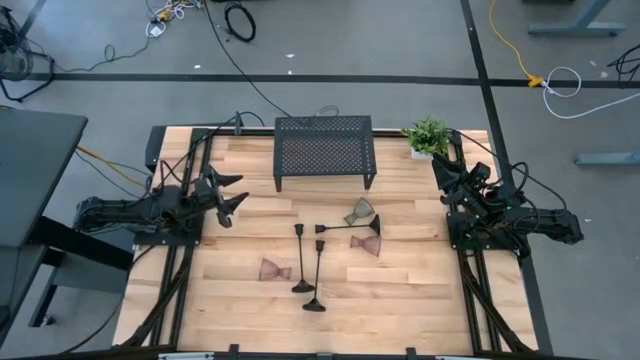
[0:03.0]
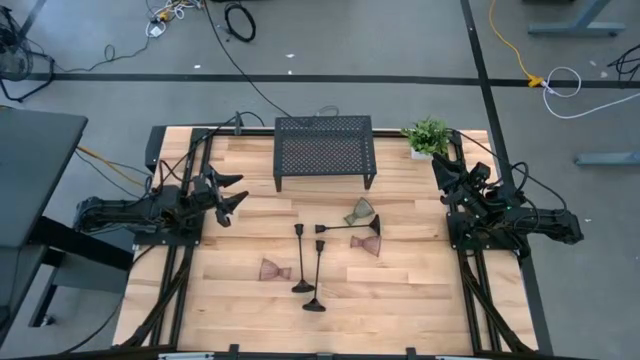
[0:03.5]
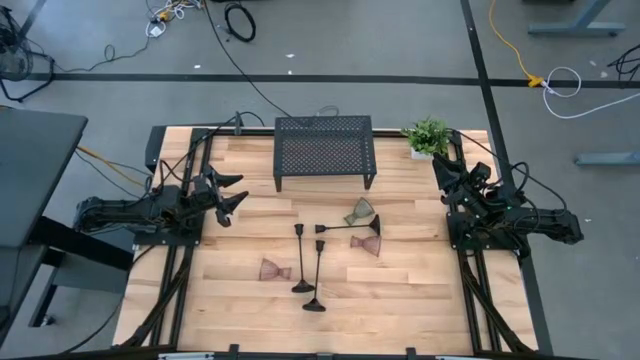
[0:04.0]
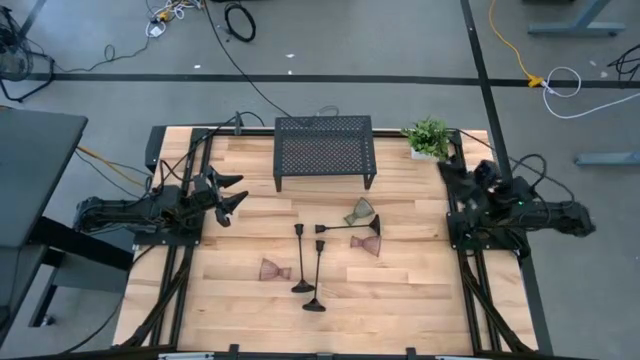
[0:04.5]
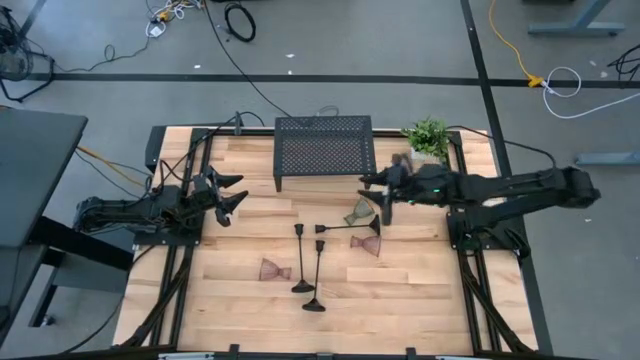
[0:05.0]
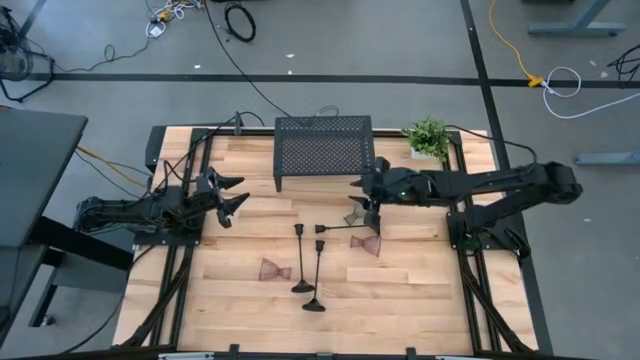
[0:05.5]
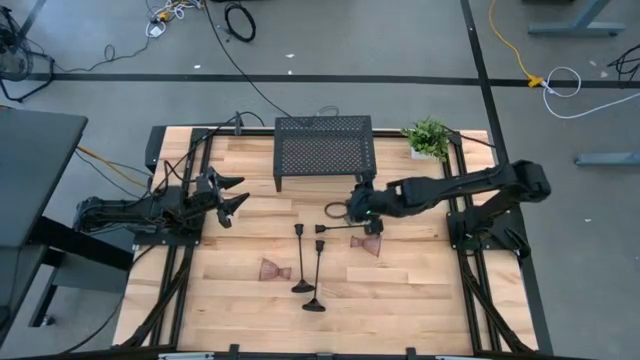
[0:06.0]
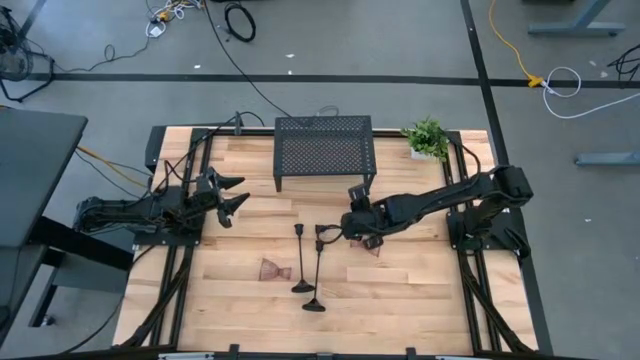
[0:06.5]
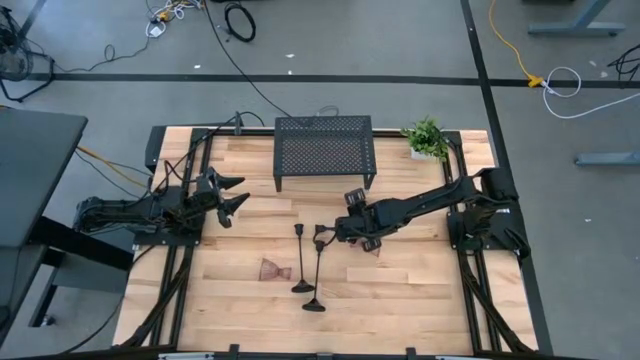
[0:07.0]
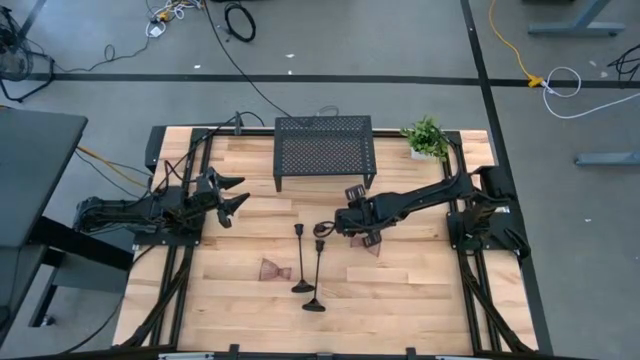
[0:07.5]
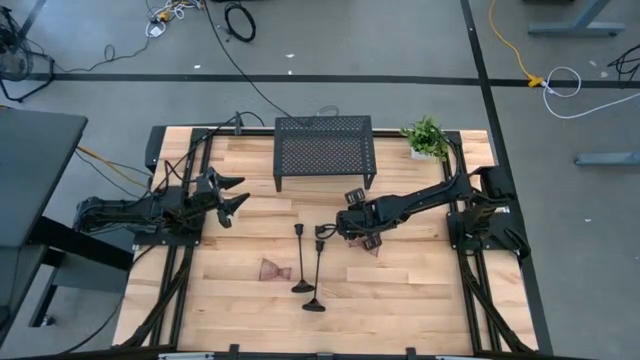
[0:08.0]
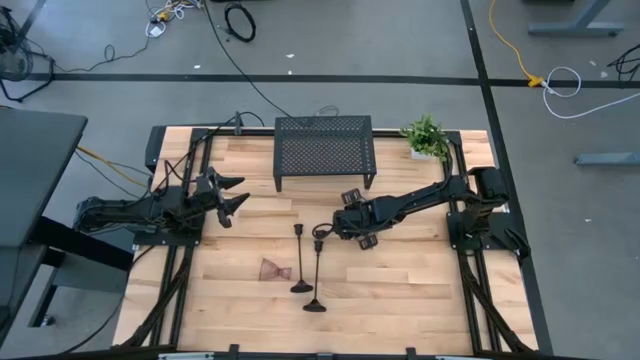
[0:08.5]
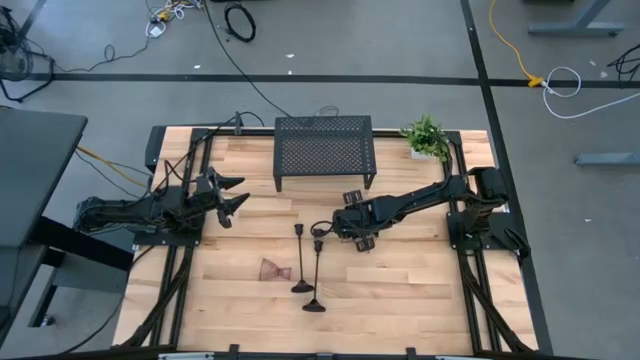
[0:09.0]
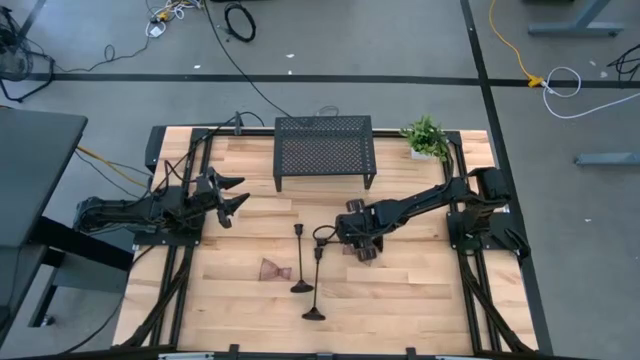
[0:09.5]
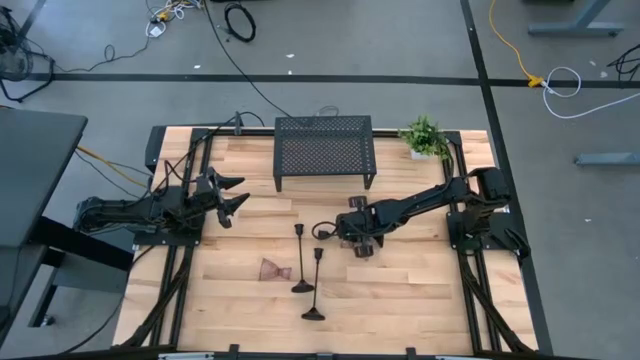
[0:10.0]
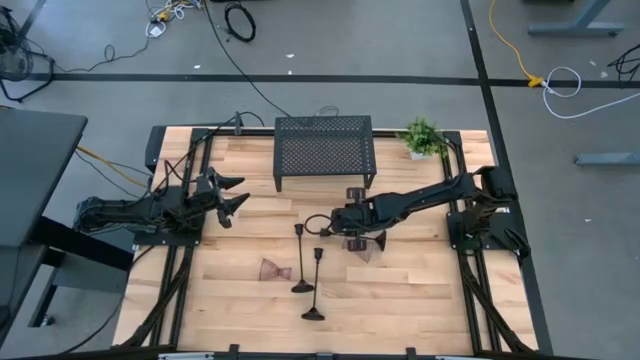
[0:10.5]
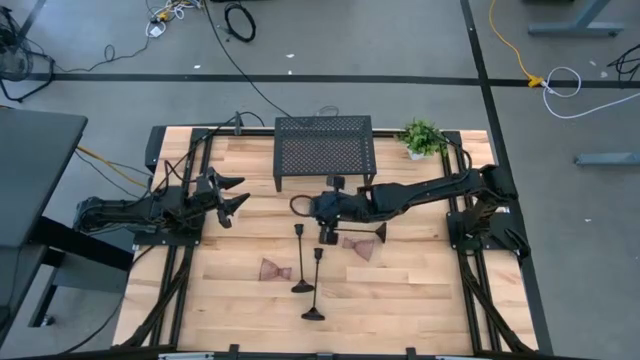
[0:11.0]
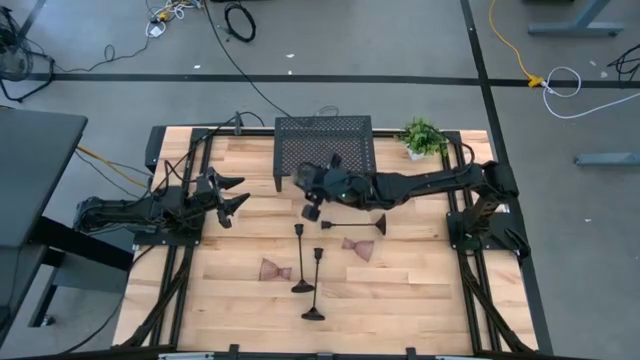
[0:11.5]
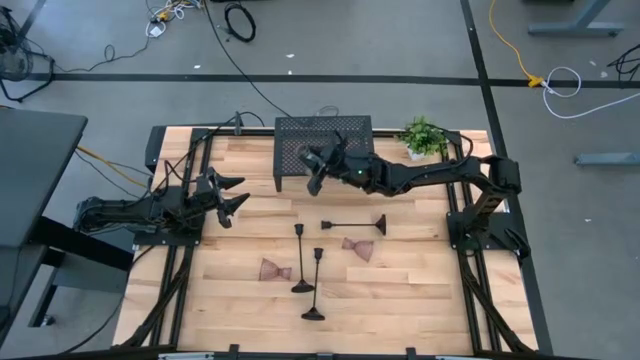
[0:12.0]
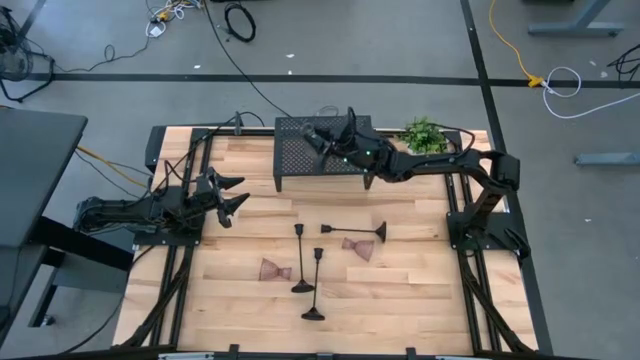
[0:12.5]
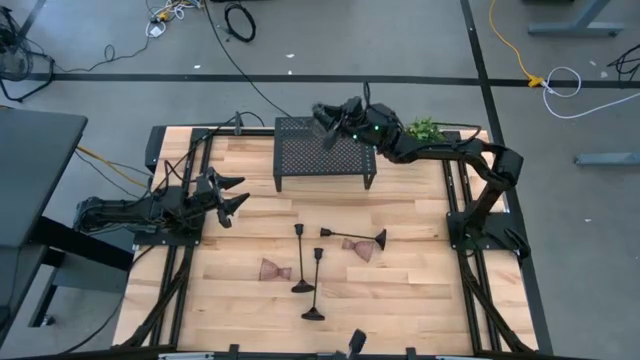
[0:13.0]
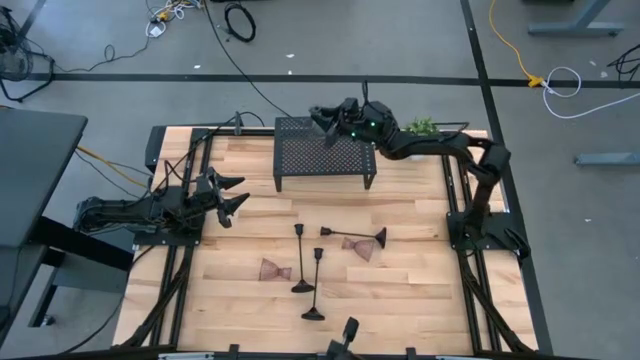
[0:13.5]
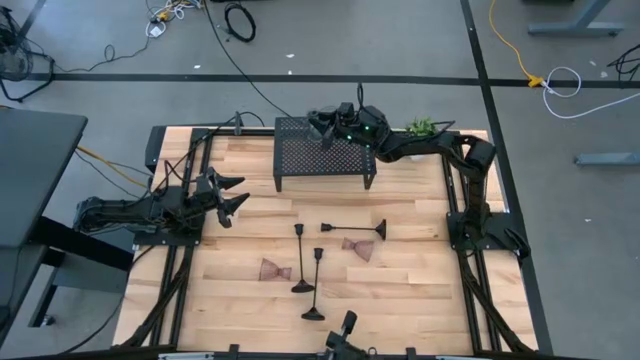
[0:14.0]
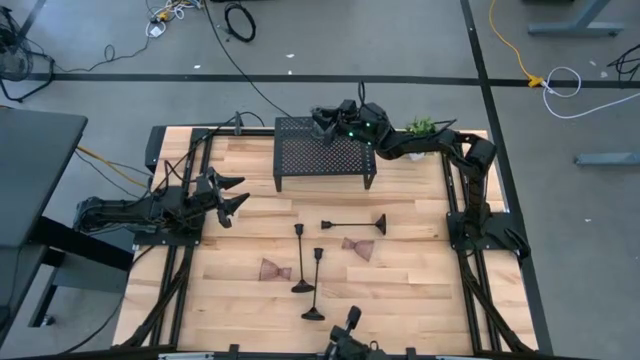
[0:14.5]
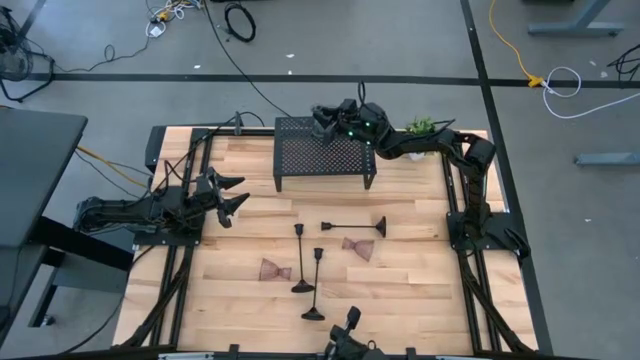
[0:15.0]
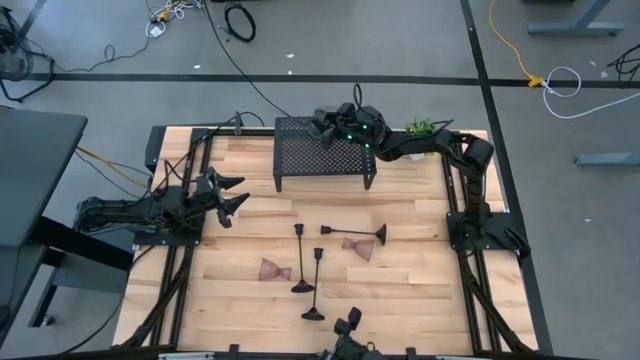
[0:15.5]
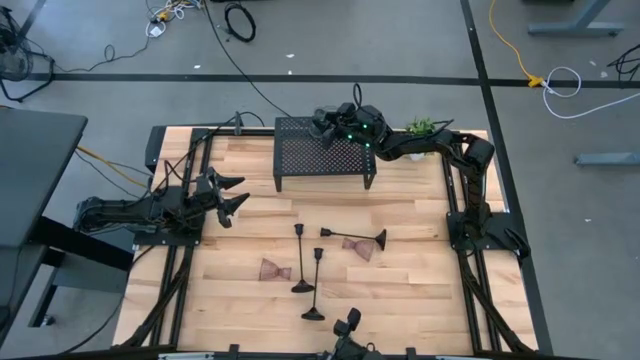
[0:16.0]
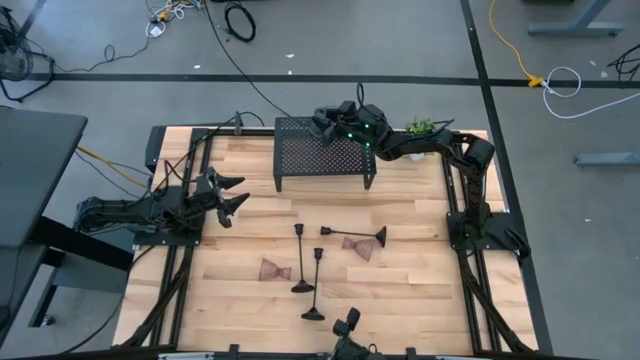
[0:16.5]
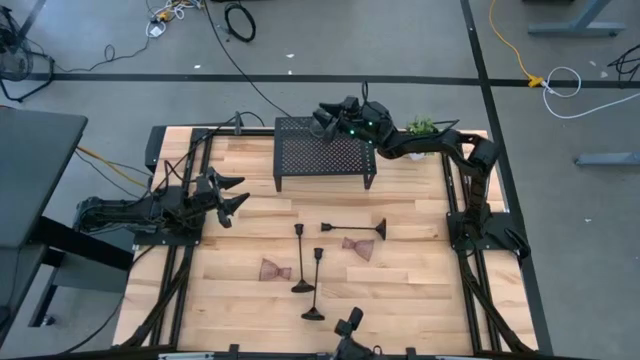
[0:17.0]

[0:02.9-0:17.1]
Task: Pick & Place candle stick holders
Put the green glass candle holder on the shelf

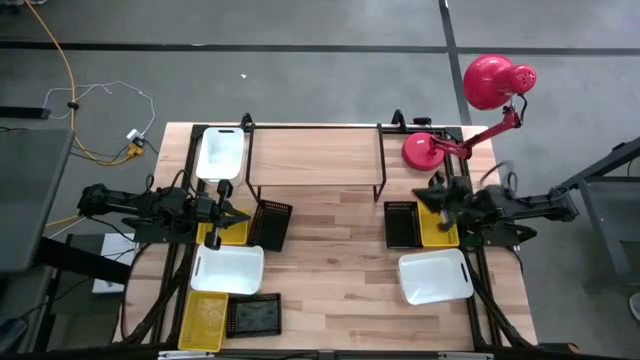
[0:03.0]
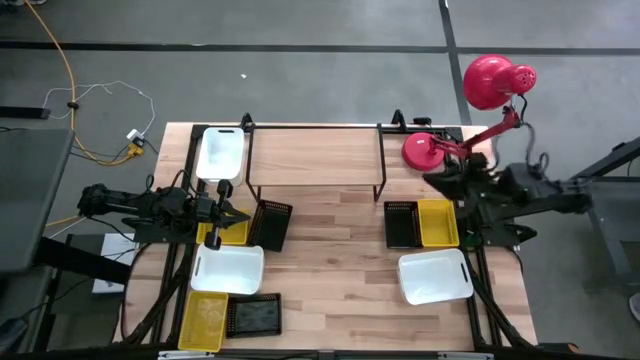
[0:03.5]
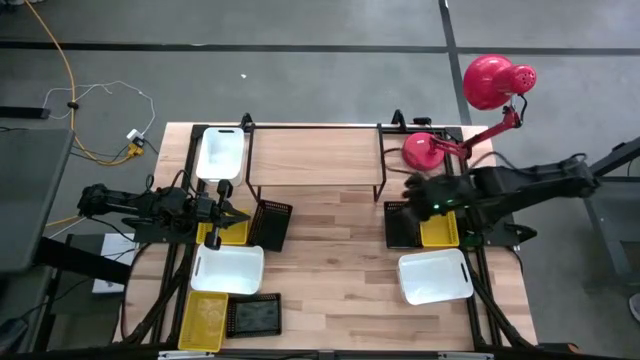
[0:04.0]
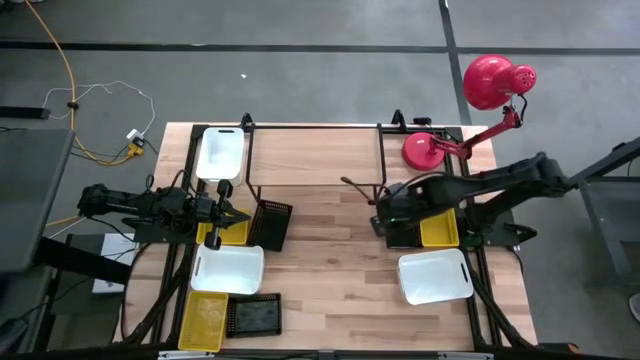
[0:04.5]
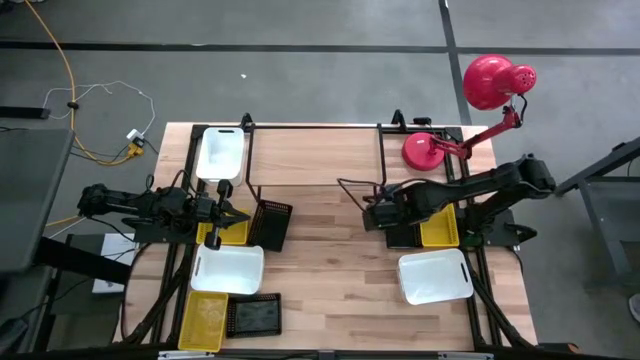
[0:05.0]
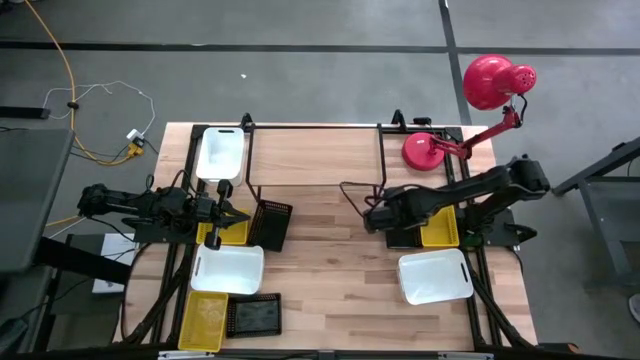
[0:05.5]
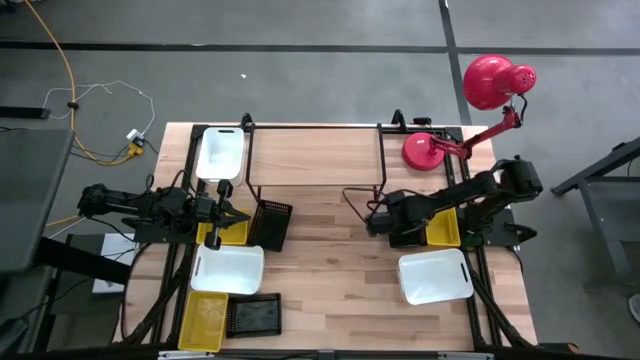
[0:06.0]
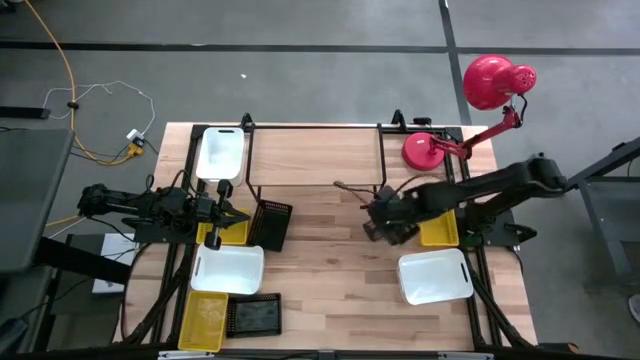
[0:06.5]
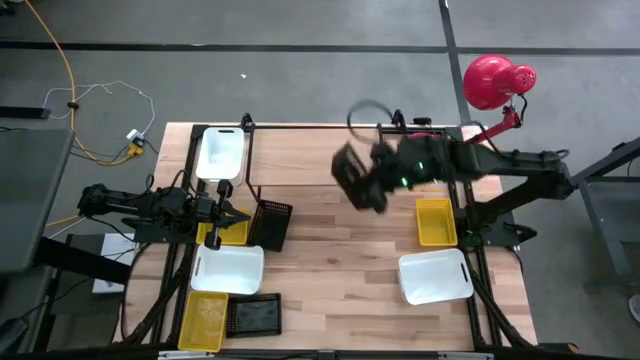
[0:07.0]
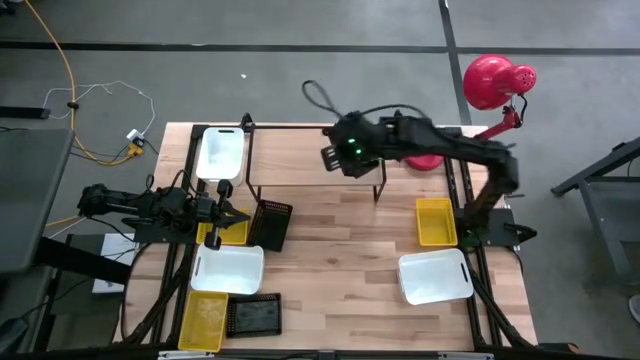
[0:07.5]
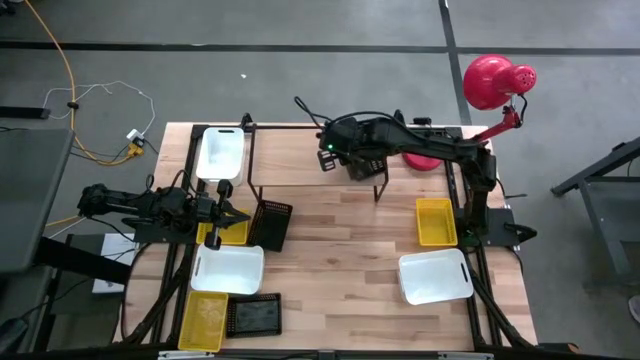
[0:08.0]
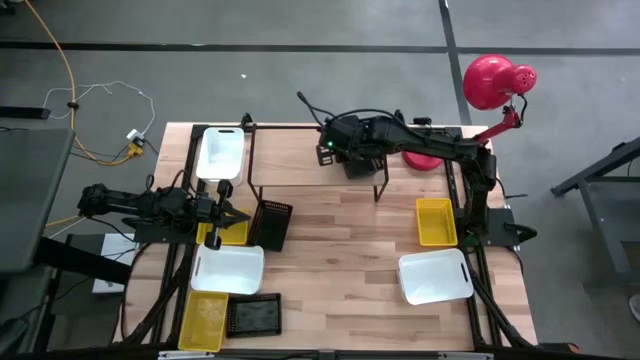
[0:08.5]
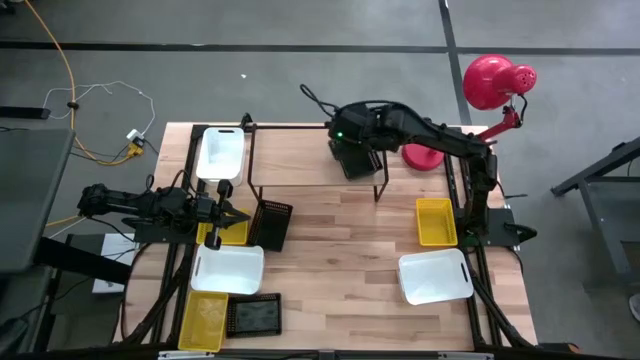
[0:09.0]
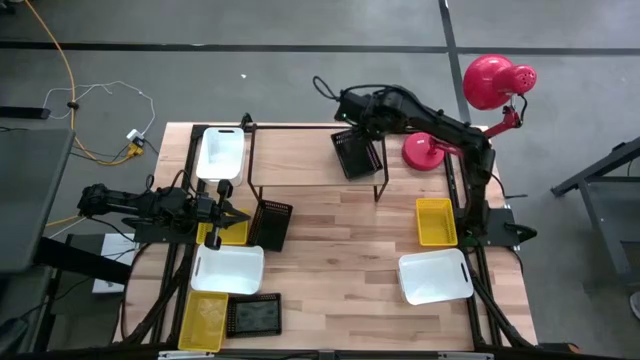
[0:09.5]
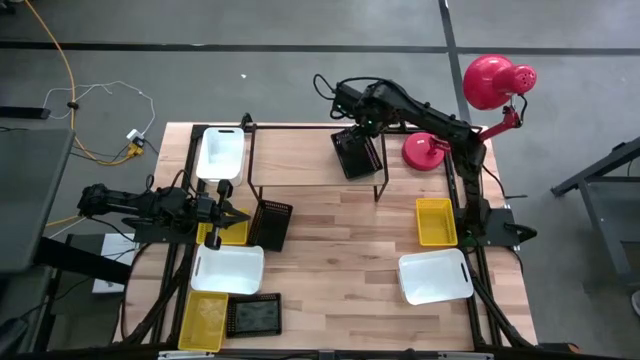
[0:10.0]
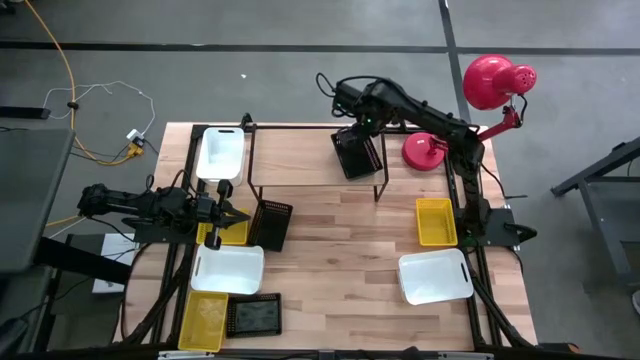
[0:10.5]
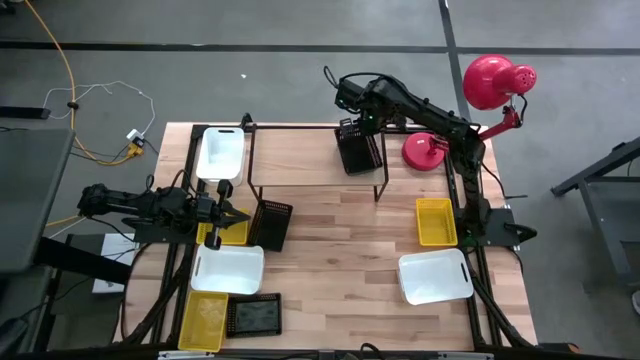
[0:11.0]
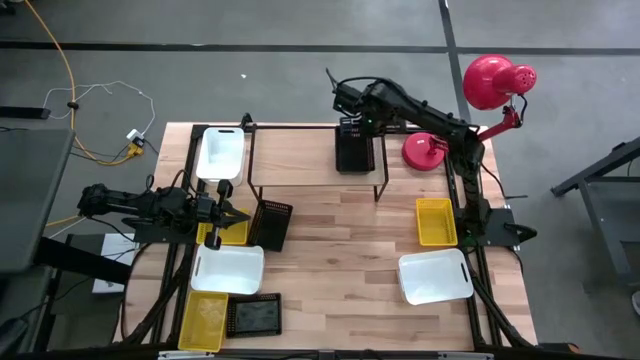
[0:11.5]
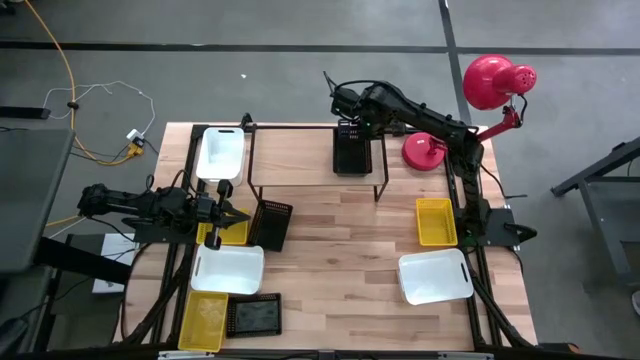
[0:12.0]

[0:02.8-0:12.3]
Task: Stack baskets on shelf by color
Put the top right black bin on the shelf
